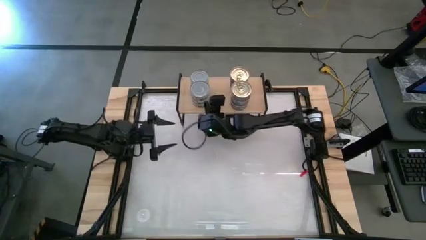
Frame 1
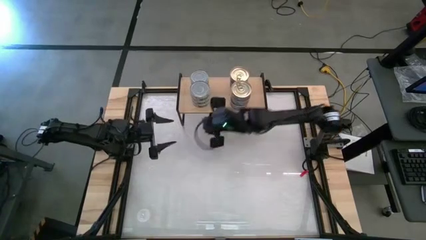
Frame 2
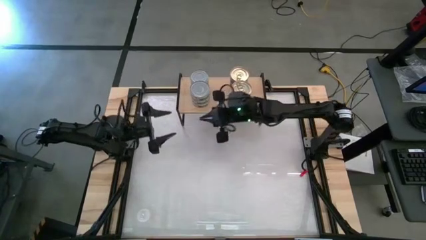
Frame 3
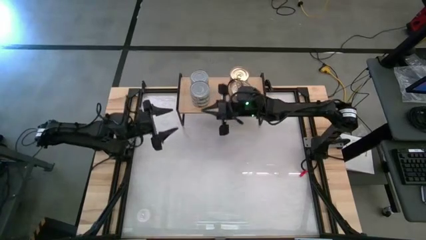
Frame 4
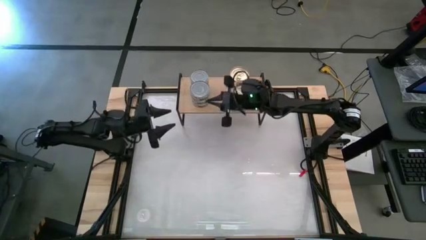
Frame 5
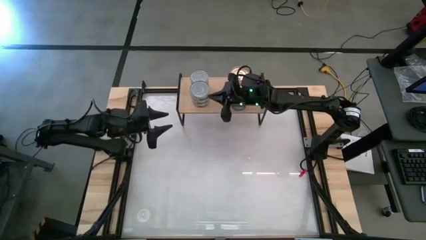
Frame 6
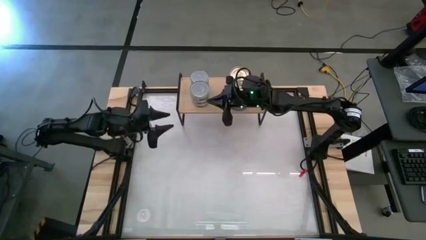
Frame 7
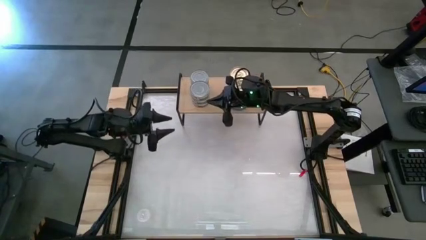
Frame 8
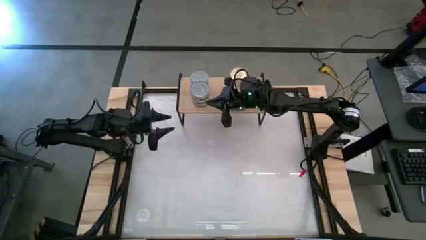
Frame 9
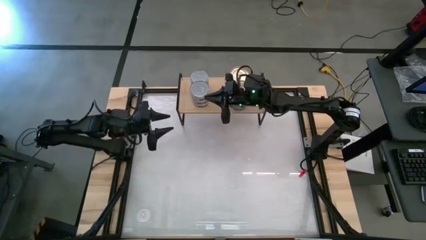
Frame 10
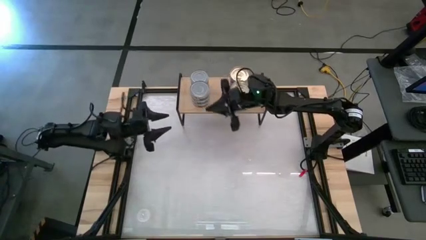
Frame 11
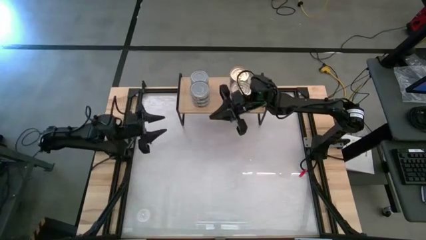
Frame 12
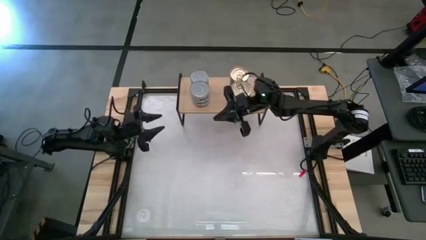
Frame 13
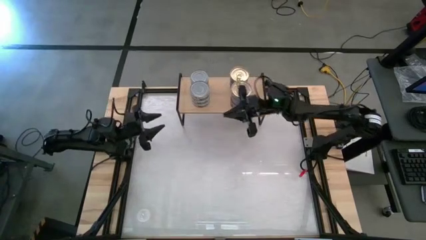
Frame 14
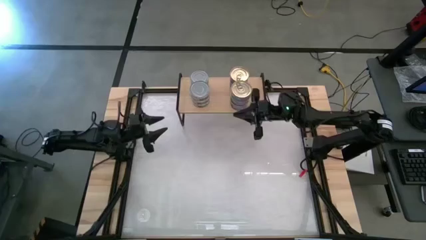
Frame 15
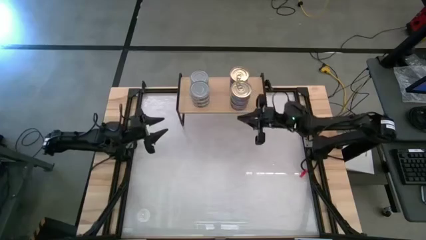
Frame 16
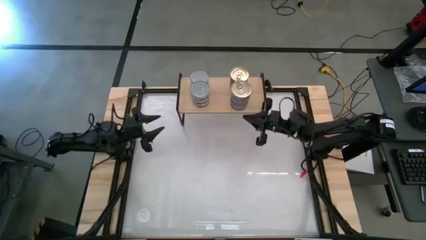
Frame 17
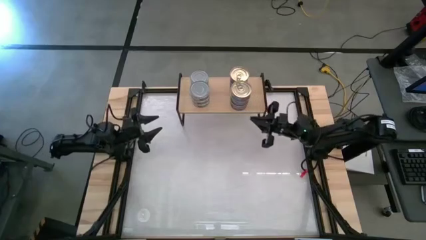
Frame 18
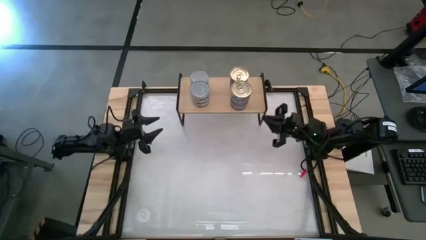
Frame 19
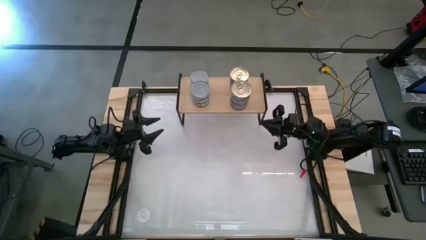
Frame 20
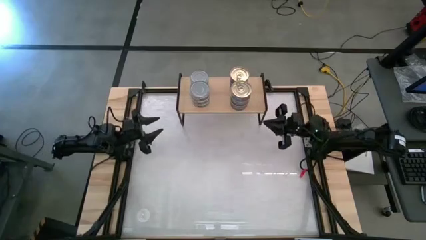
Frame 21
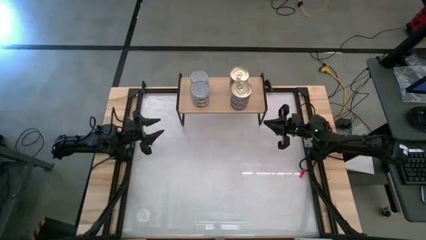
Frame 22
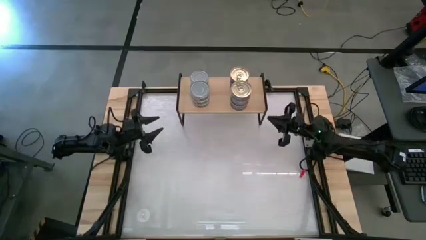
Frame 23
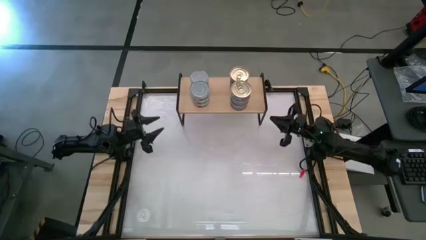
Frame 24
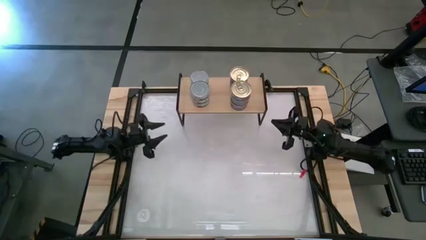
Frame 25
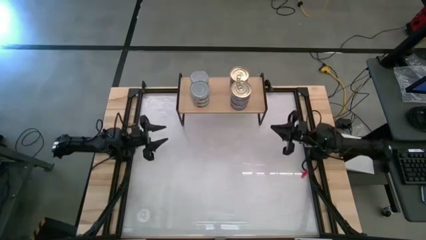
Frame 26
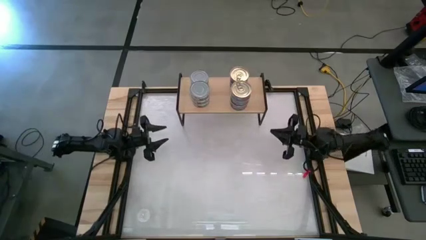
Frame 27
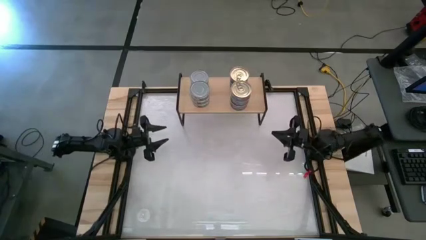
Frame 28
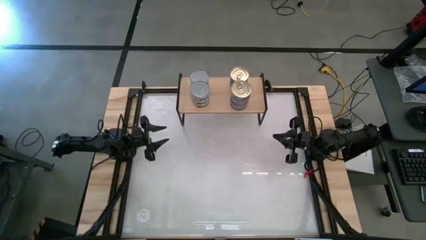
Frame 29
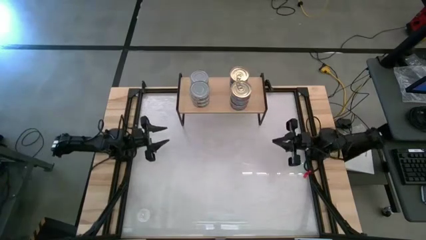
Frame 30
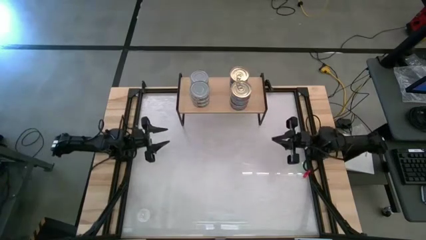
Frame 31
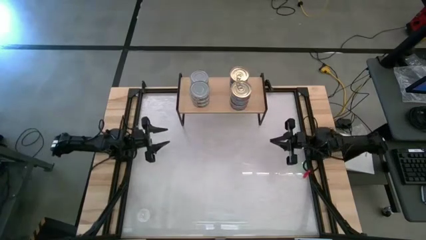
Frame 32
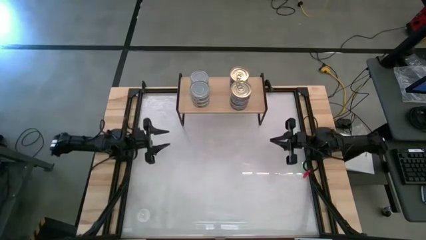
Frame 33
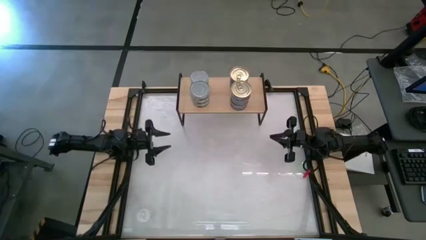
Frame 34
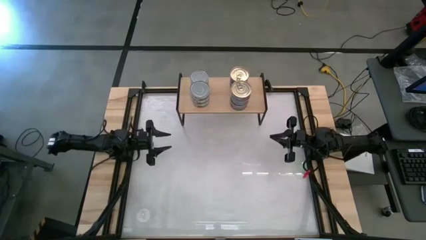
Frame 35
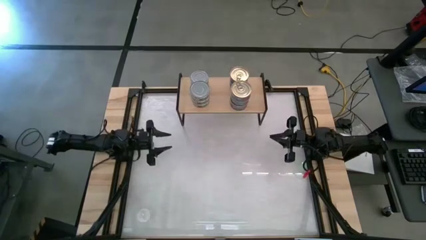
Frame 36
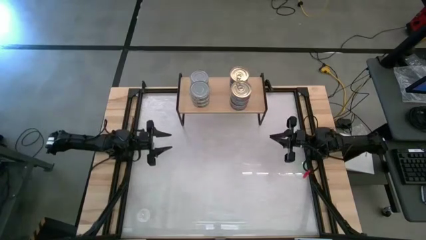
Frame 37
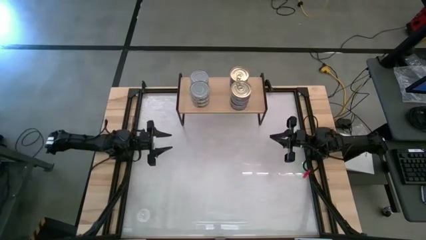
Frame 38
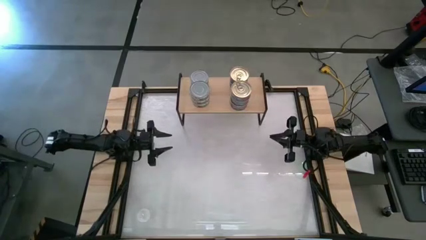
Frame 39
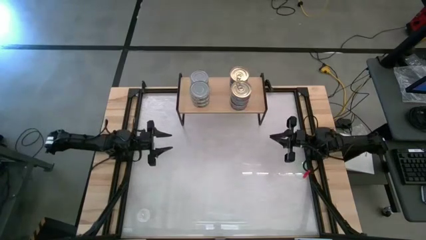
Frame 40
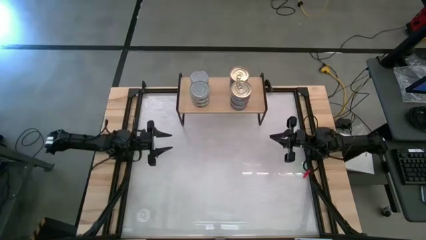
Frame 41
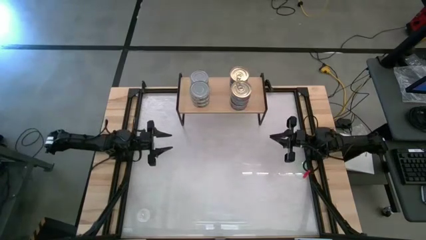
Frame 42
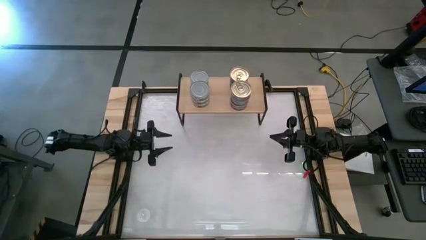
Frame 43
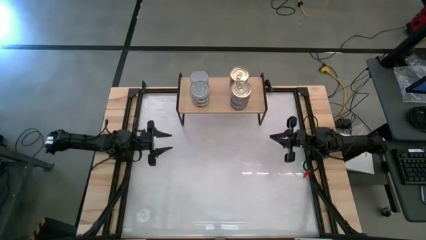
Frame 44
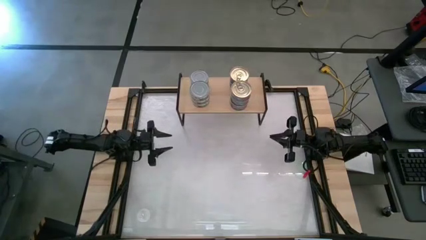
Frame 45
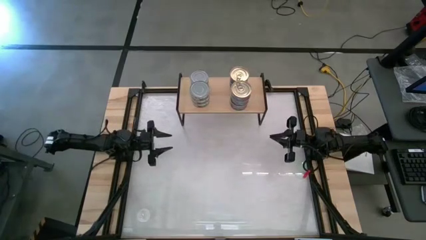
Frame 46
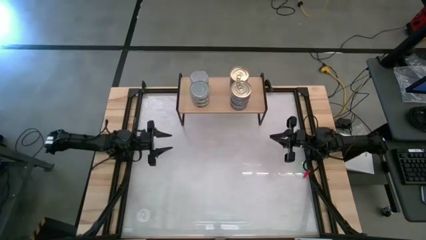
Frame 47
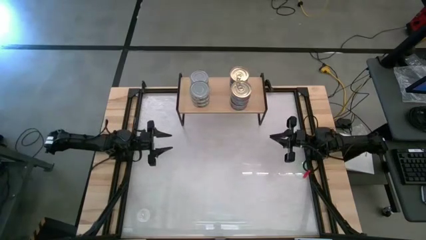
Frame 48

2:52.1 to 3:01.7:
Task: Stack canned seafood by type on shelf
Return to Home Position

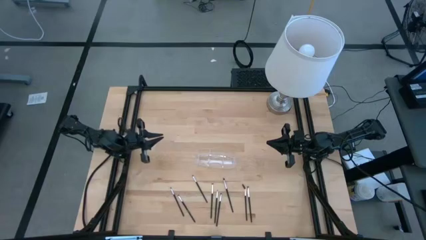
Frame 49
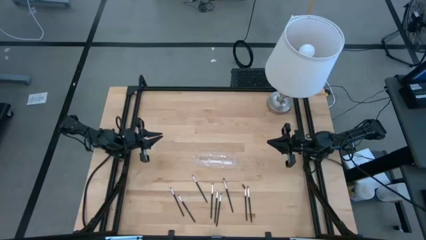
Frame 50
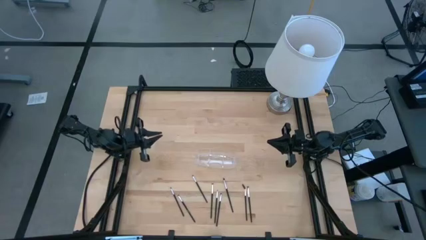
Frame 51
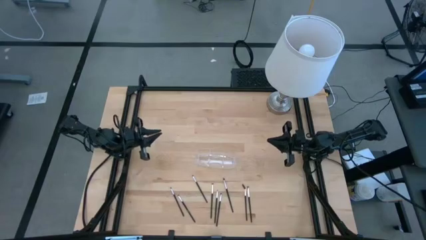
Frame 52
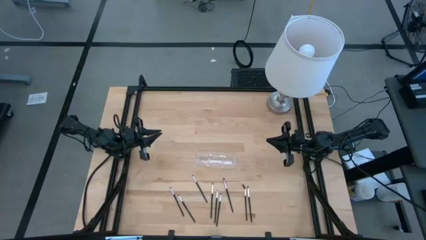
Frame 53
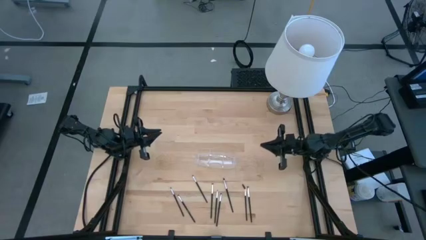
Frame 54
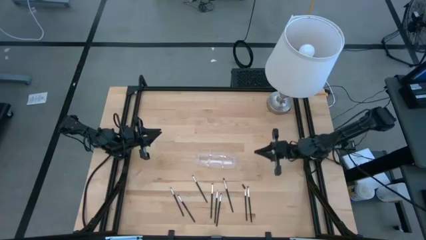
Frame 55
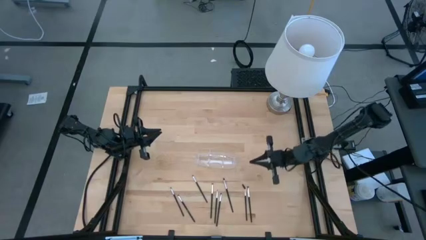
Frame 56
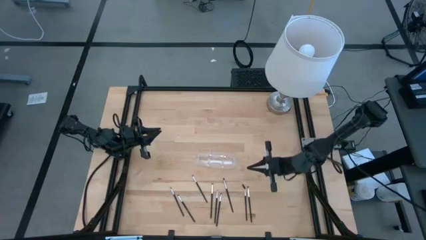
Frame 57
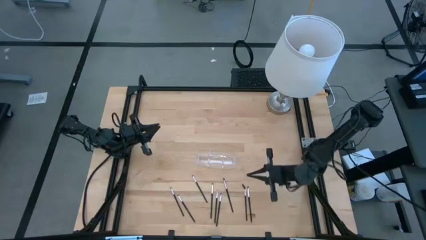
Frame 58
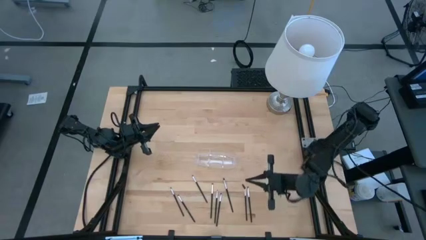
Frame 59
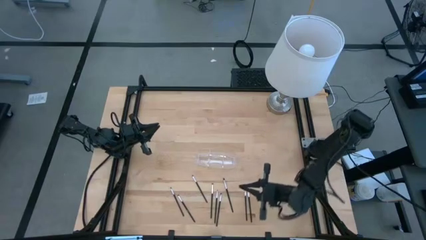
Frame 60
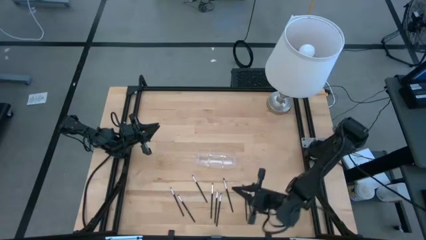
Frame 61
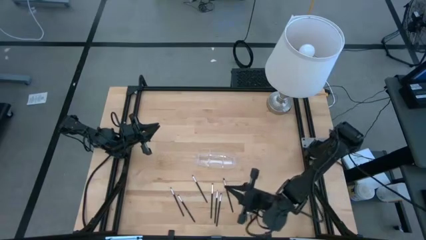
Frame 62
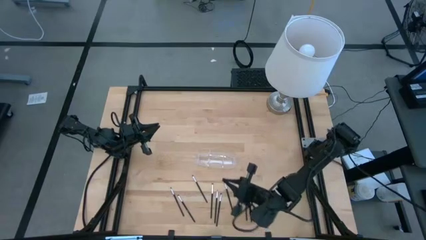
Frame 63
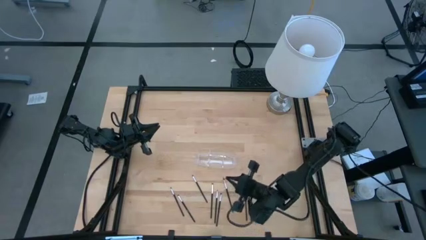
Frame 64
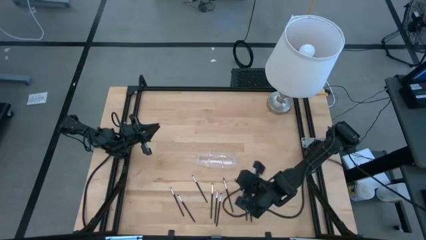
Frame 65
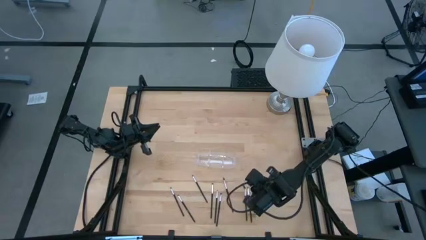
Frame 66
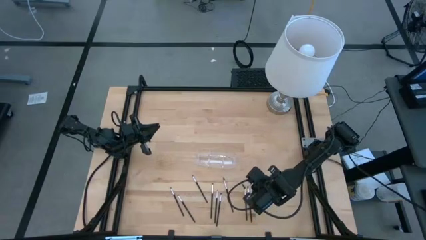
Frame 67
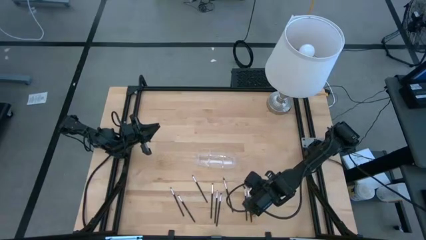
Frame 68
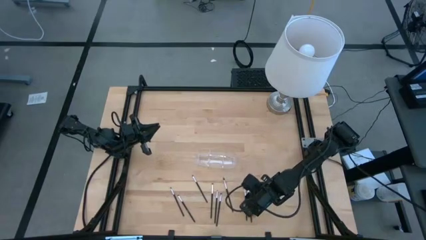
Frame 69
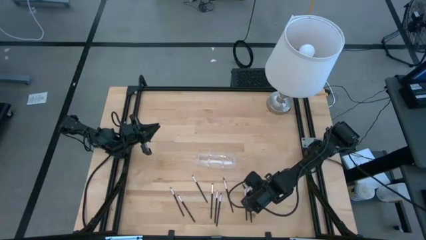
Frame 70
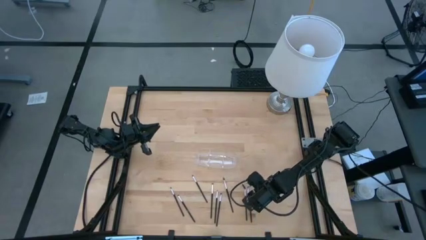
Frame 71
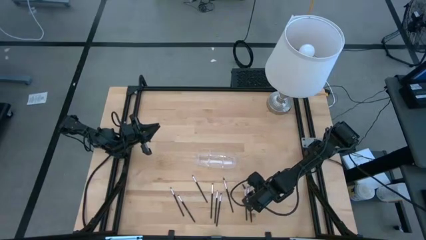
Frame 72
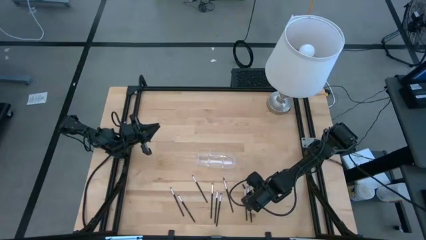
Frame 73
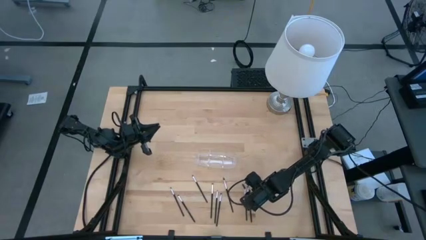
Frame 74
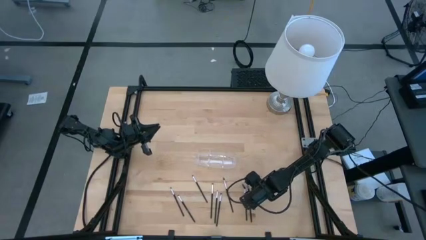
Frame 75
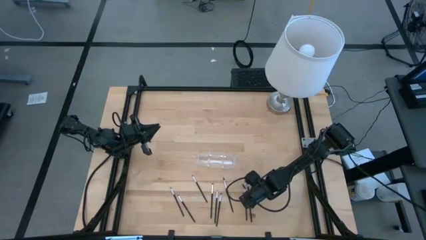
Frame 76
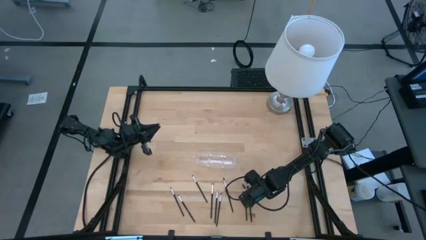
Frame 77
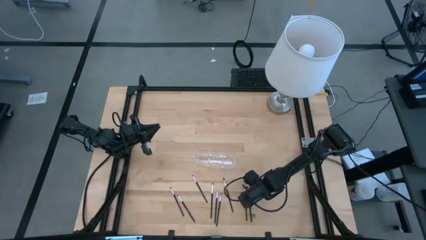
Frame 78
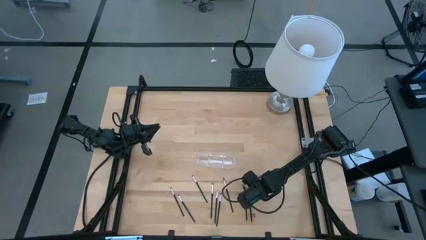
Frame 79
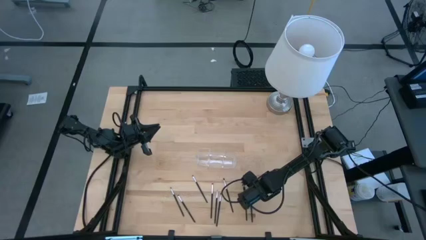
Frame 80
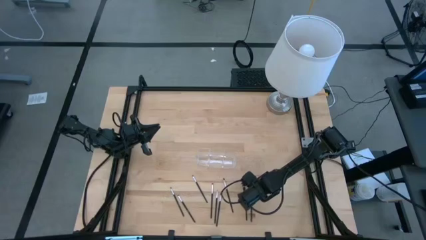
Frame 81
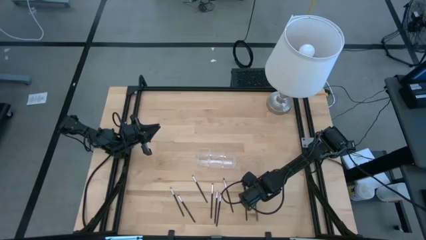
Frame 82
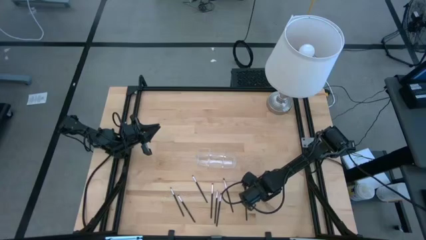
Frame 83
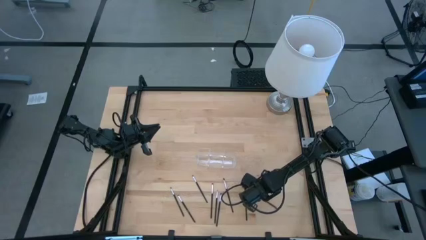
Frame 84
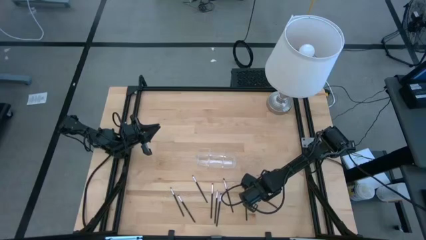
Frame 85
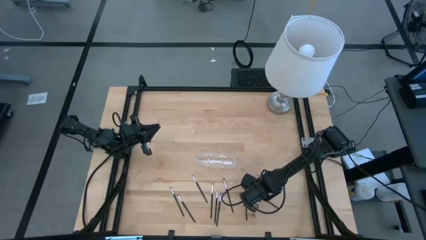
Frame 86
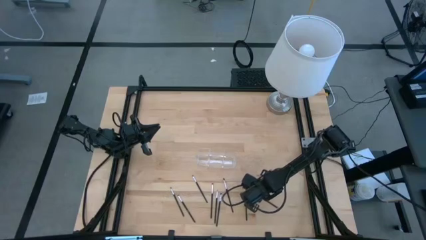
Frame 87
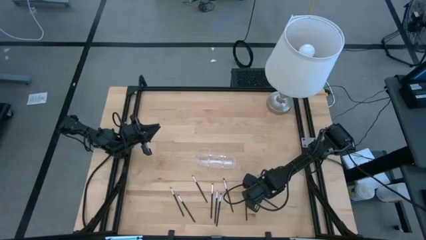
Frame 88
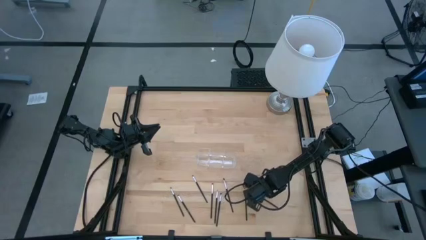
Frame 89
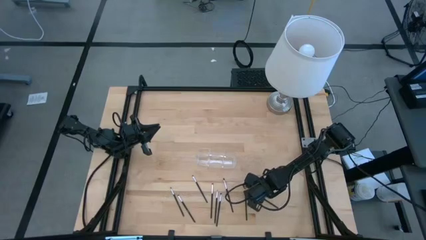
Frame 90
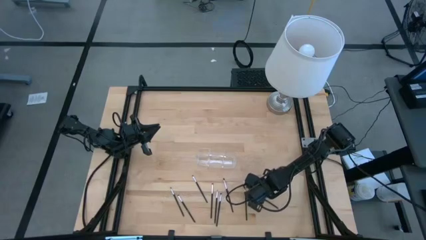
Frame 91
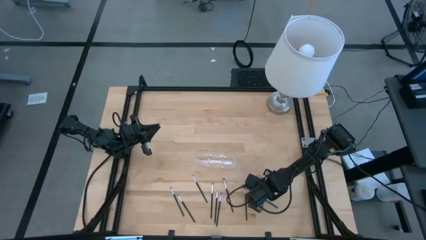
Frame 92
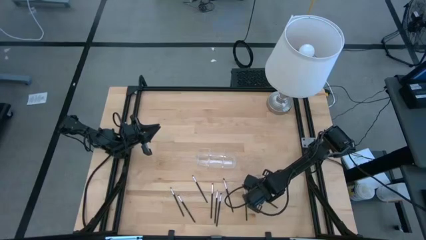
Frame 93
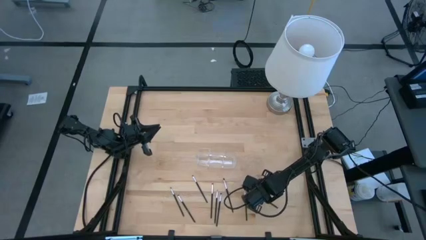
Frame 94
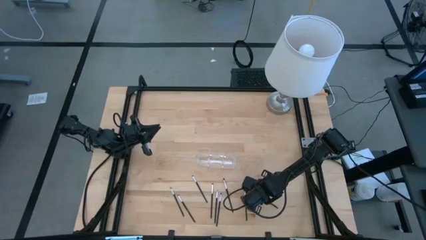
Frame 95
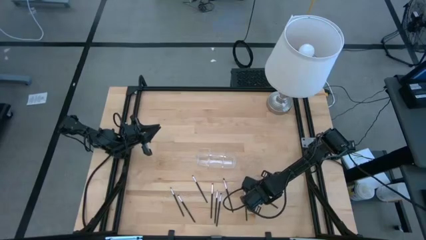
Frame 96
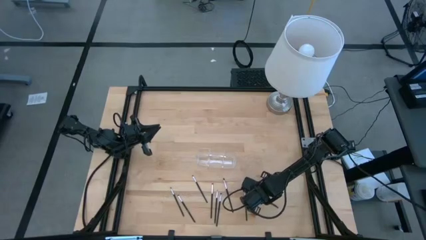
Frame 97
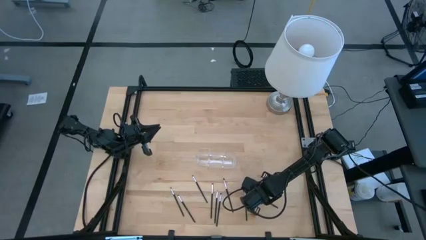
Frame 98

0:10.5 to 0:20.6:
Task: Pick & Place Makeup Supplies
Put the makeup brush into the transparent organizer
